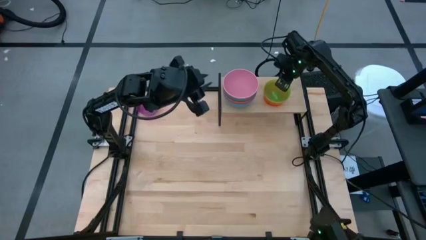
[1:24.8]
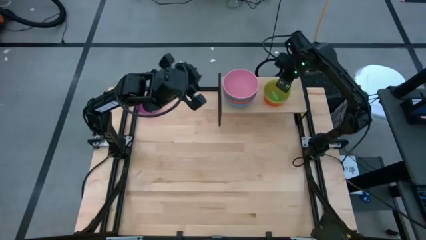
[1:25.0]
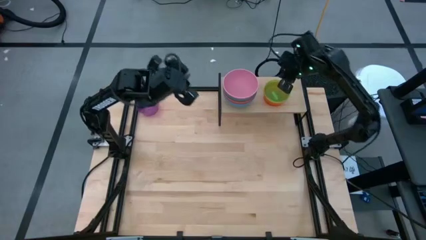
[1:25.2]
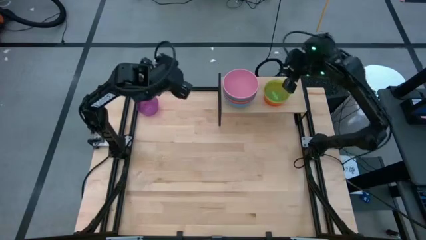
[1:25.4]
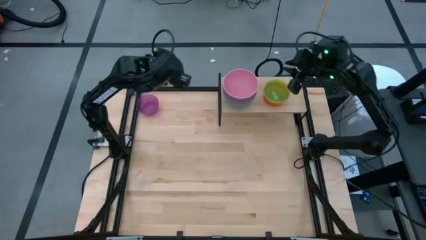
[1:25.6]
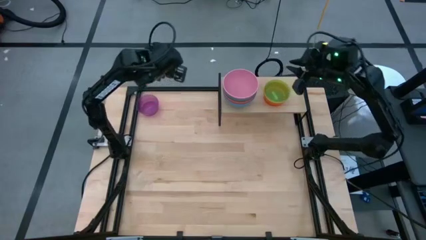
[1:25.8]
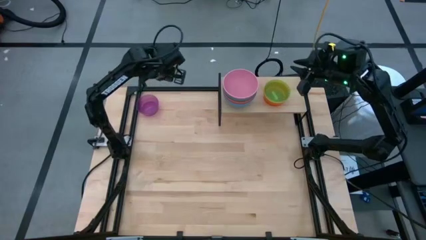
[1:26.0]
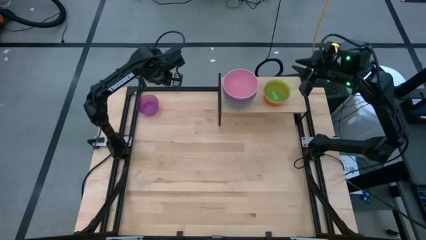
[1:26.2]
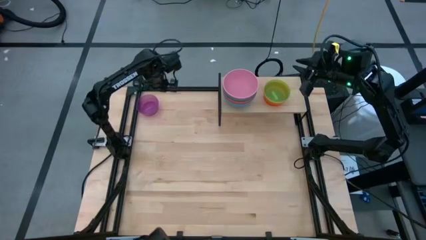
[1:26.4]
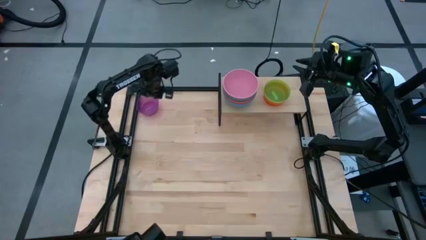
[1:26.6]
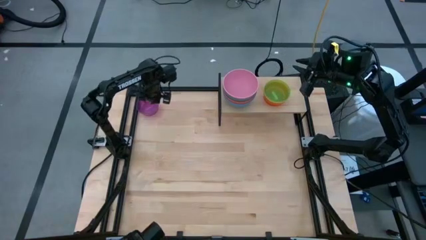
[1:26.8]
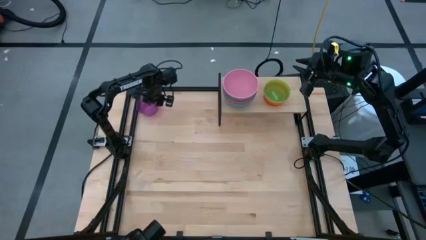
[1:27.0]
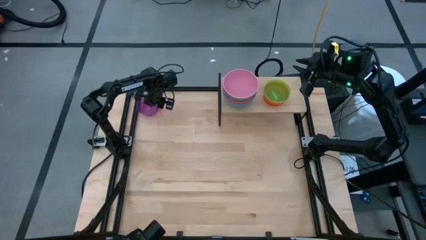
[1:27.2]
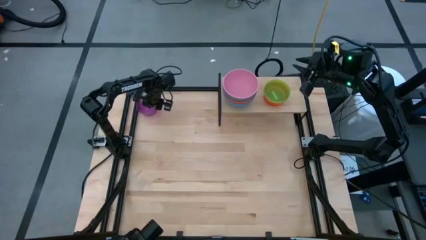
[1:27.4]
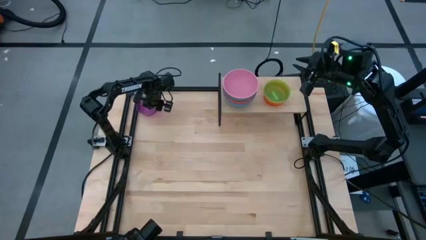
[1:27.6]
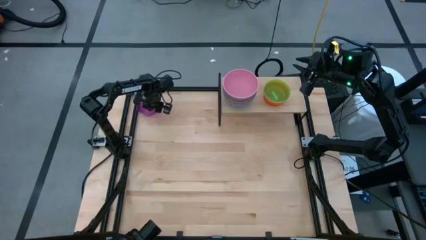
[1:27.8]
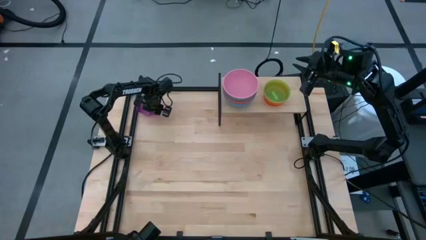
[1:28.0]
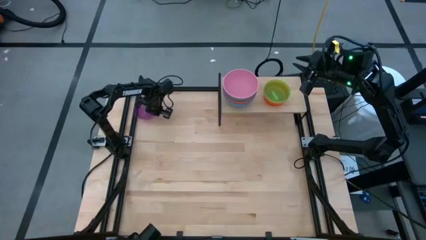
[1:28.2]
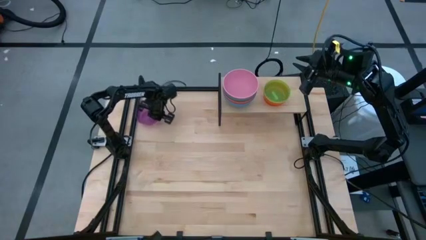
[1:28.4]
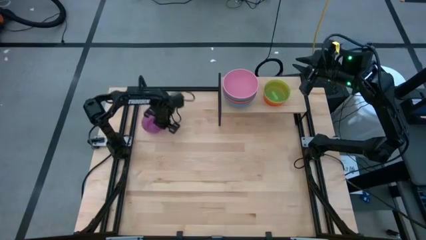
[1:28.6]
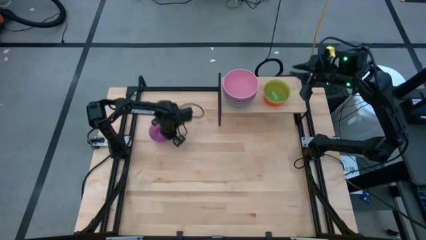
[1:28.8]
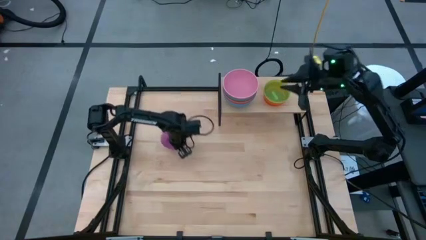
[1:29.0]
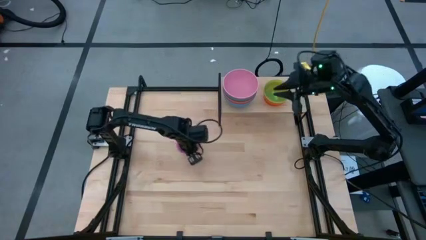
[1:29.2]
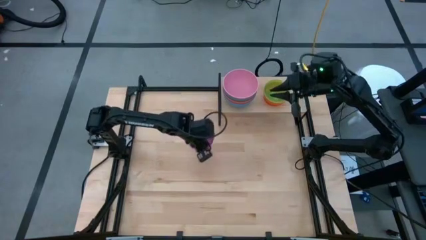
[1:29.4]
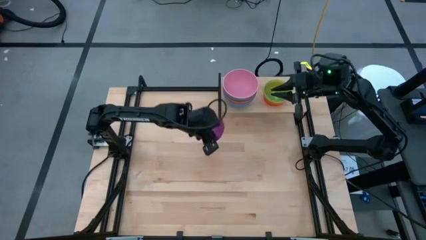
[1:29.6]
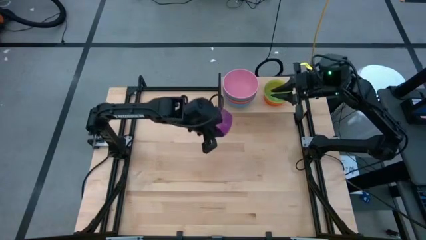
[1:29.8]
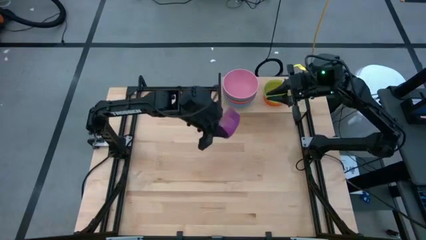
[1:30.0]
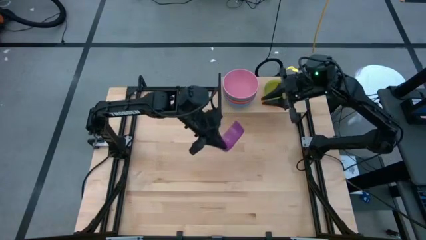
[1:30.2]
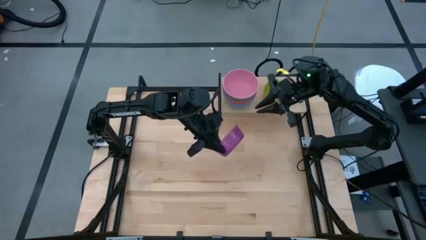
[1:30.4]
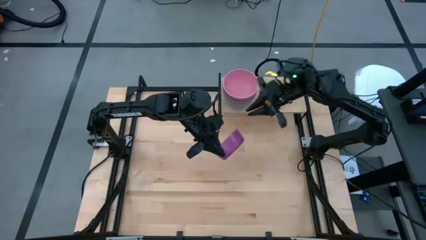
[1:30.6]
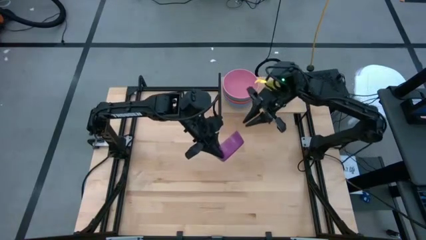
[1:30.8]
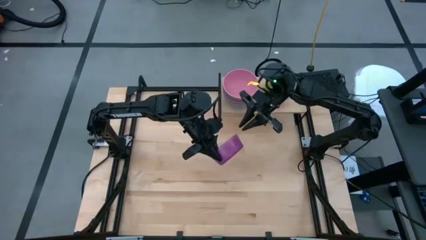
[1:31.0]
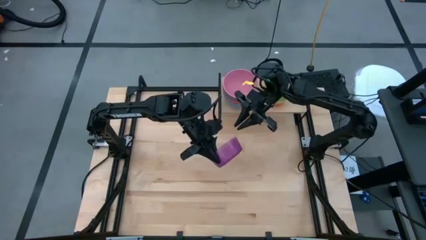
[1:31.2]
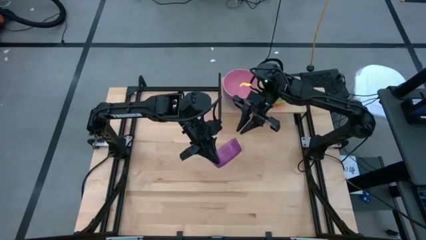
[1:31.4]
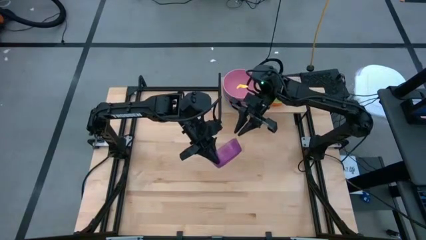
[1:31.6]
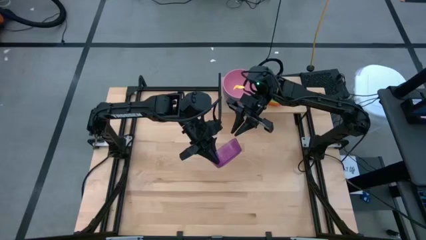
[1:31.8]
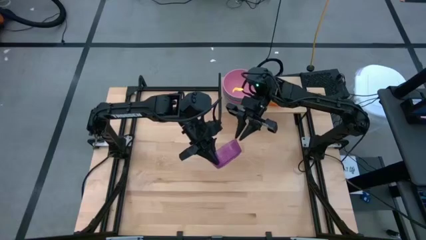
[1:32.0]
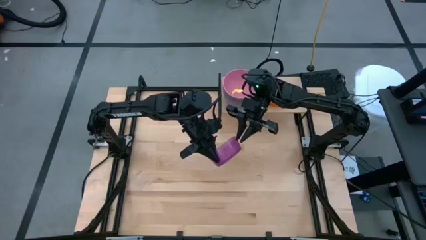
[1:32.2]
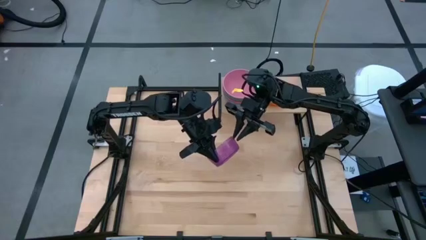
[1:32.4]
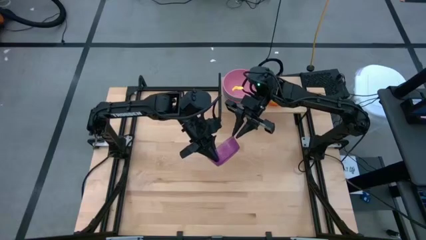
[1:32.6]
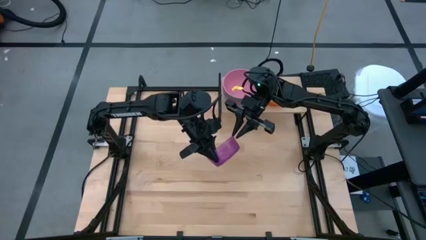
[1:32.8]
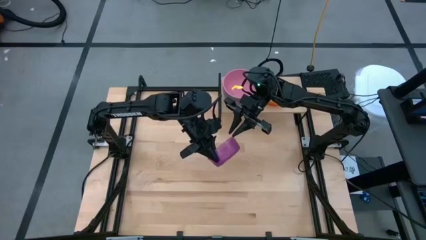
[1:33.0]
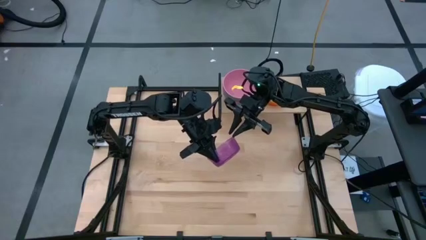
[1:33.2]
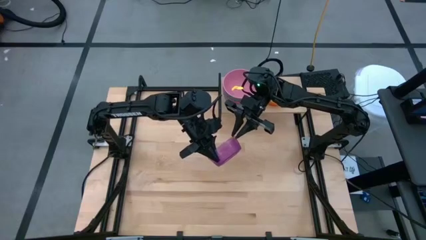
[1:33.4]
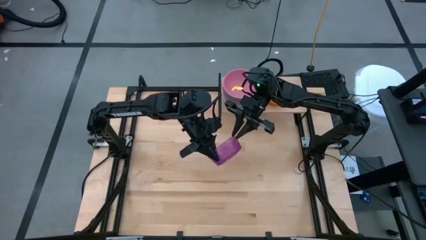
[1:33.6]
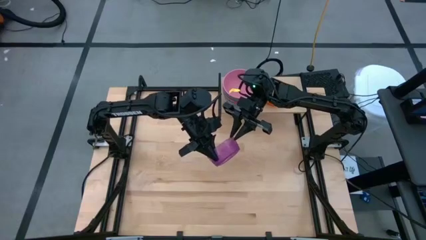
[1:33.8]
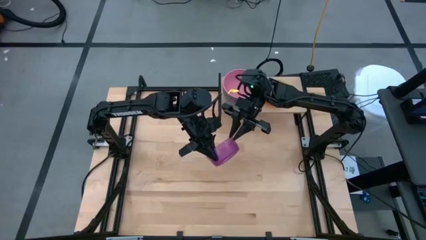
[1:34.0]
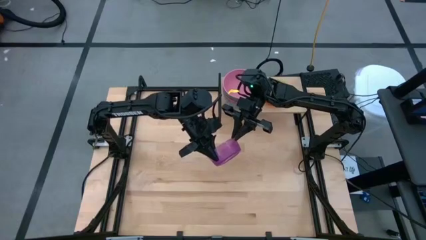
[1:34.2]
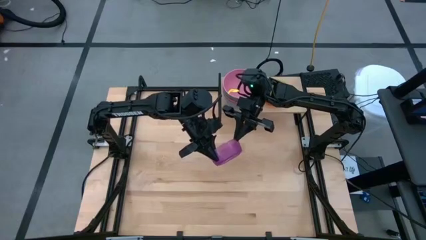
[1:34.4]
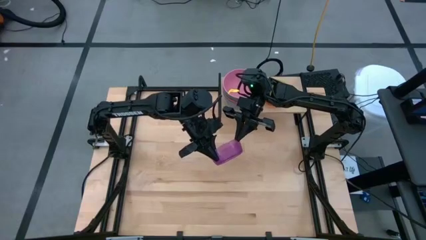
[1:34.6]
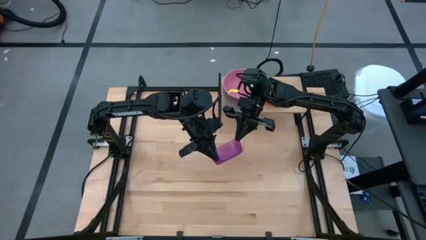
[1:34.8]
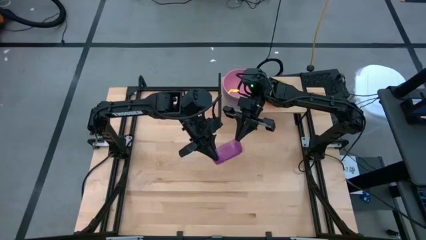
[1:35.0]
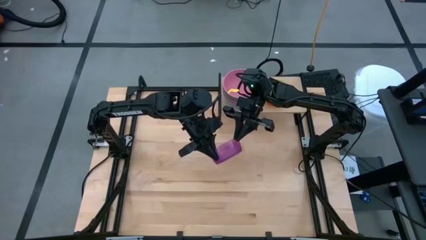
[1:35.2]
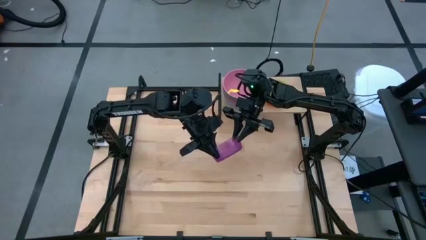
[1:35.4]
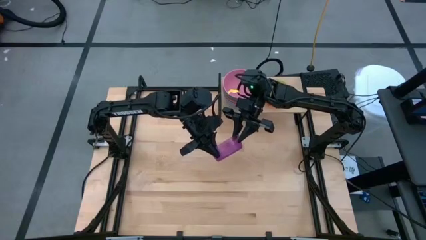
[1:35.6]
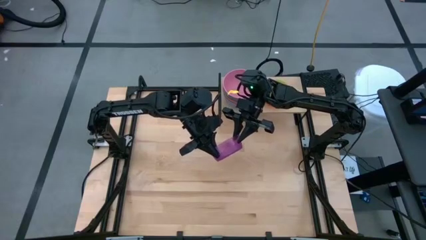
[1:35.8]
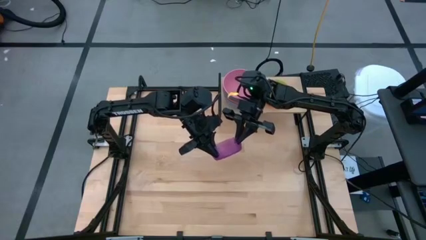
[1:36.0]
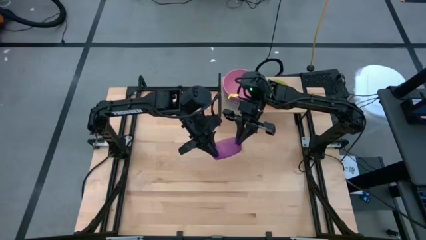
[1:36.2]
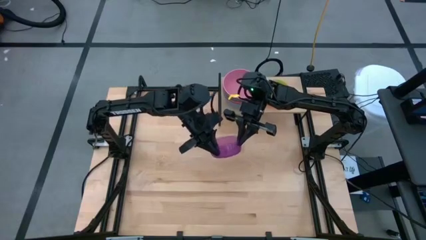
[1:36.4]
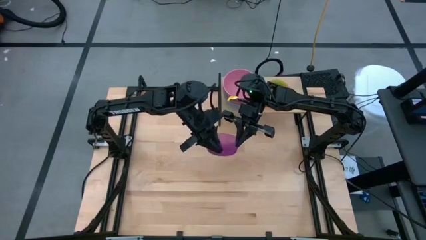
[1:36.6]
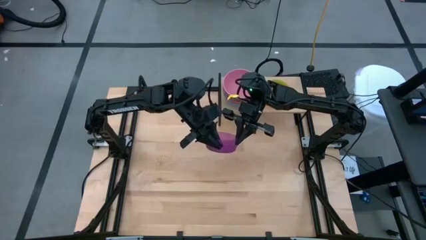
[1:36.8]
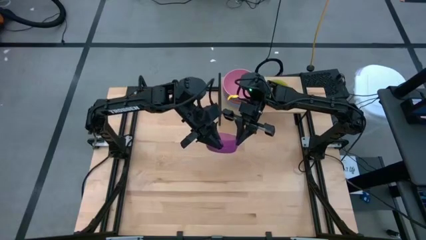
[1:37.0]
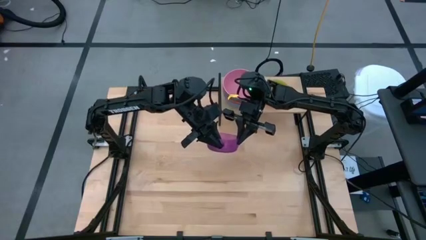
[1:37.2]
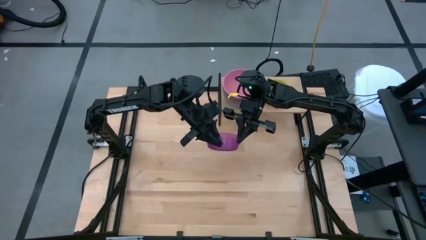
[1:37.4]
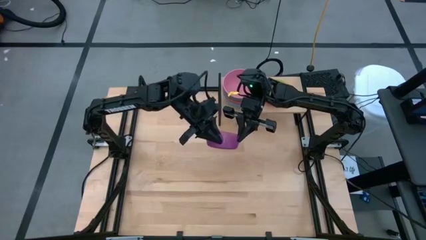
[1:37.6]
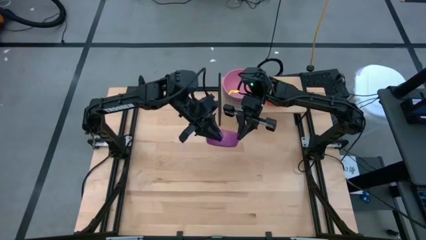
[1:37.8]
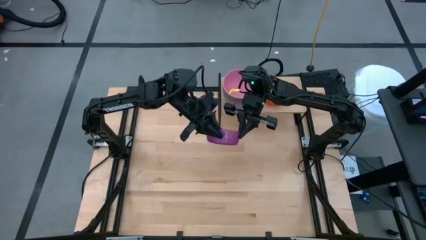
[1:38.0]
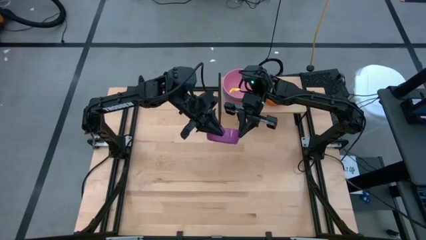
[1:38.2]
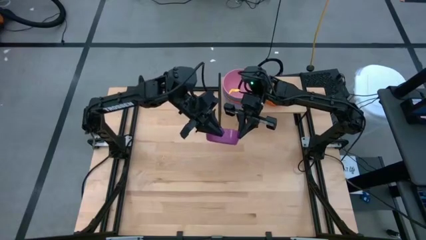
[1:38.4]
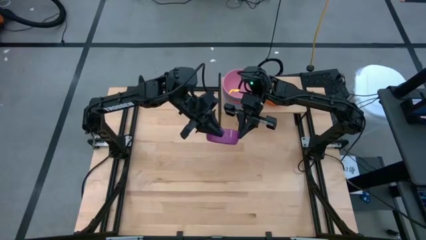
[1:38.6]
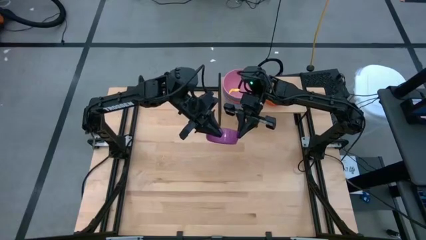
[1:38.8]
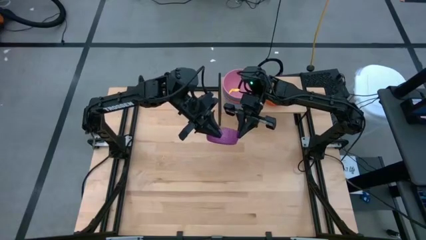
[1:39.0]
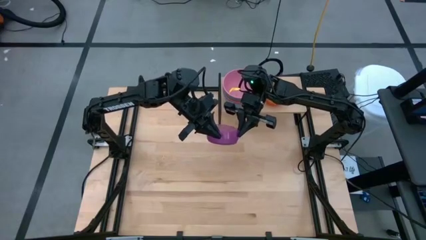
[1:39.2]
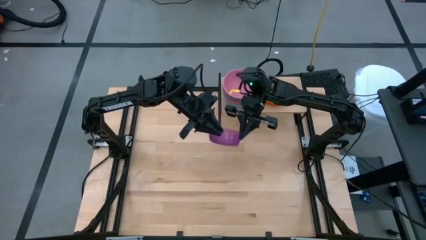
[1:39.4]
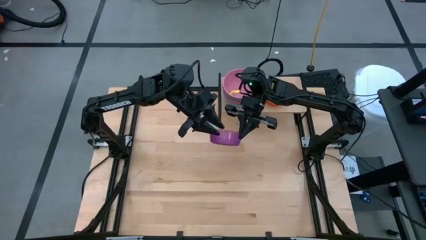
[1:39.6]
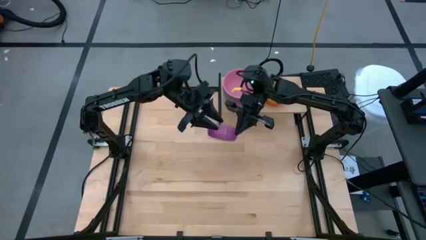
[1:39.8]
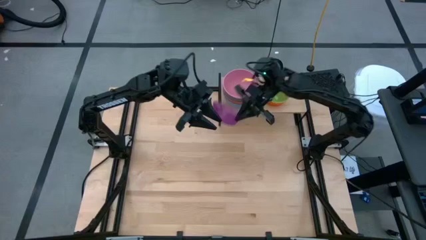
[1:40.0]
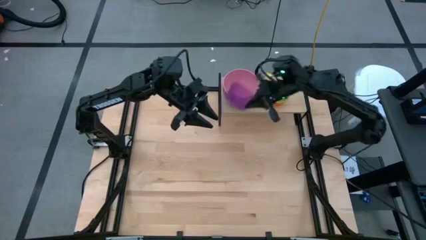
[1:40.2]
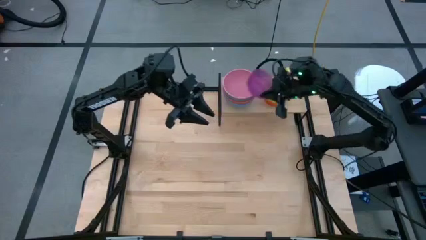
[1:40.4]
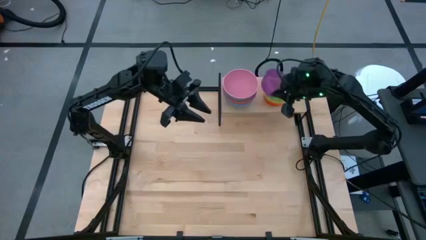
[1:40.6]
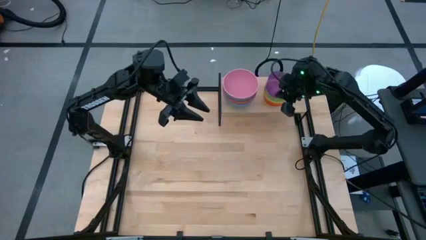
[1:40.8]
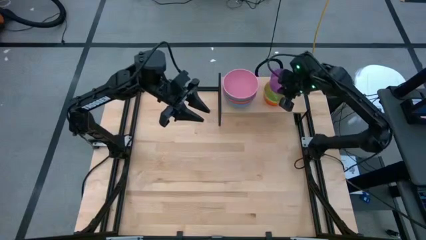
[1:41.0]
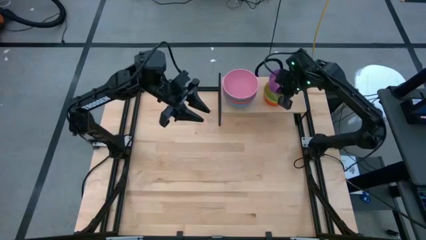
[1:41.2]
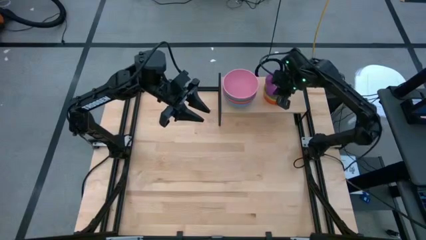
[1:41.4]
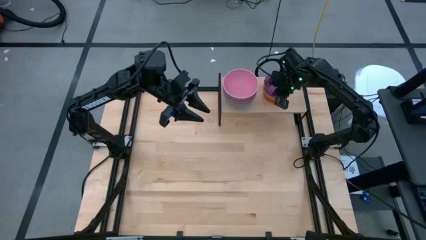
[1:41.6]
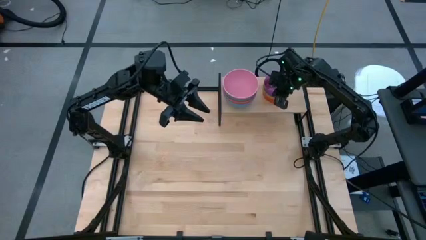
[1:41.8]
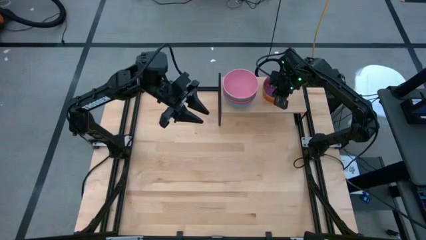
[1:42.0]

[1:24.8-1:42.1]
Task: Place and stack bowls onto a shelf
Stack the violet bowl on the shelf
